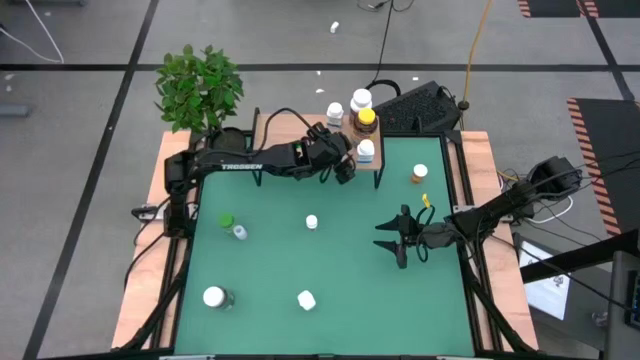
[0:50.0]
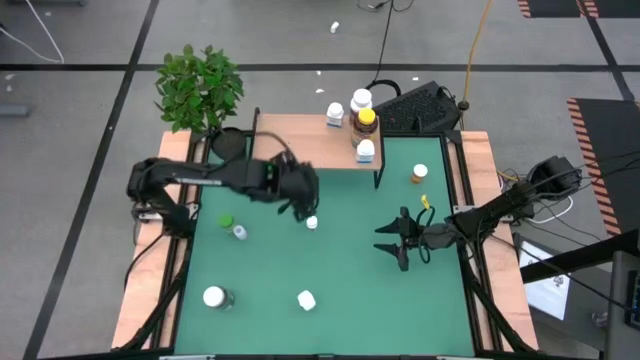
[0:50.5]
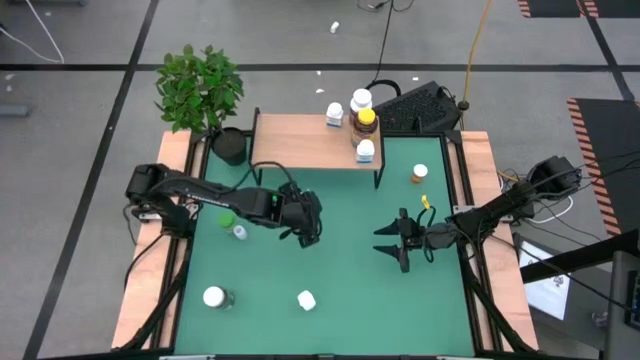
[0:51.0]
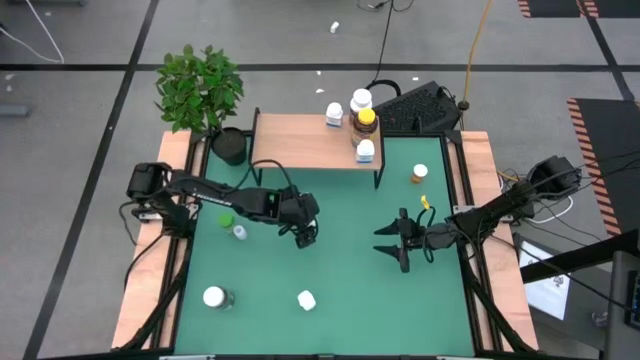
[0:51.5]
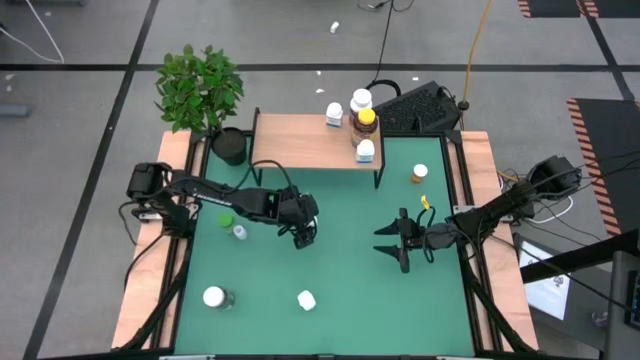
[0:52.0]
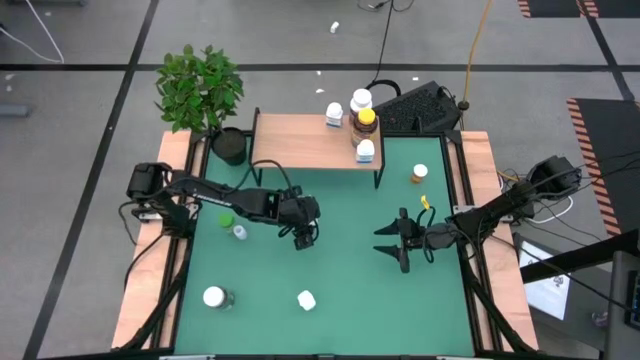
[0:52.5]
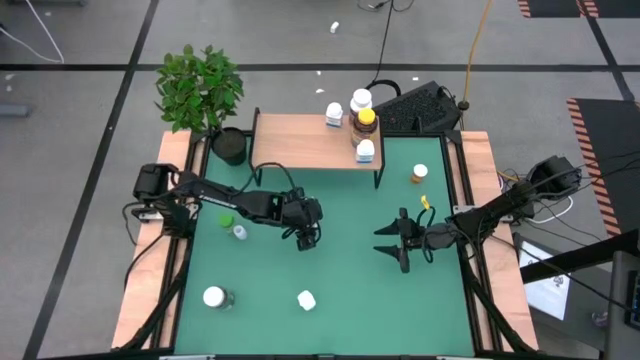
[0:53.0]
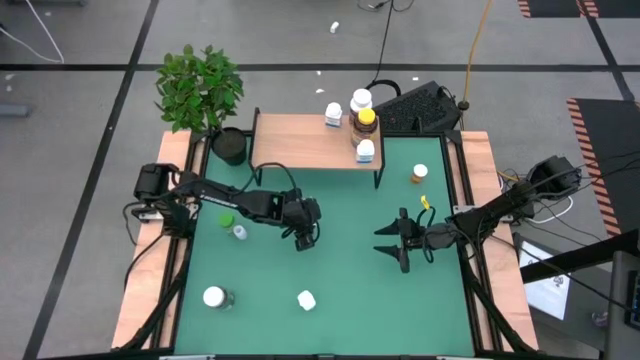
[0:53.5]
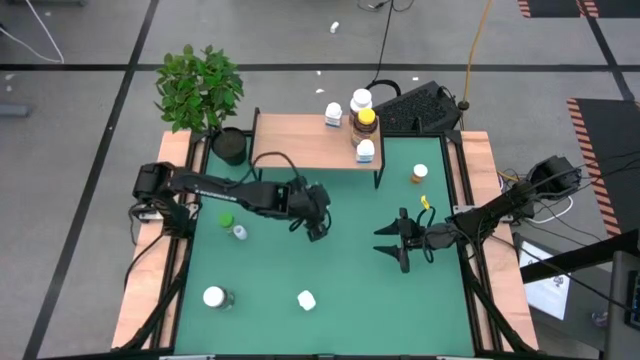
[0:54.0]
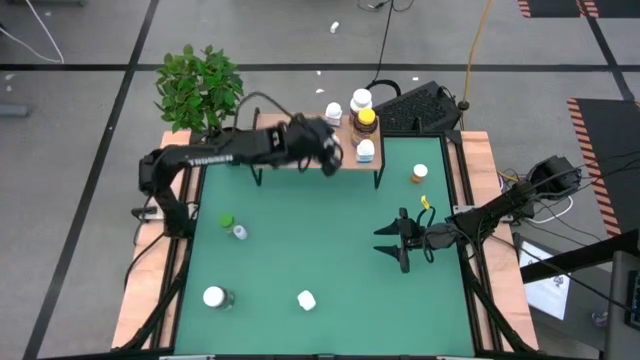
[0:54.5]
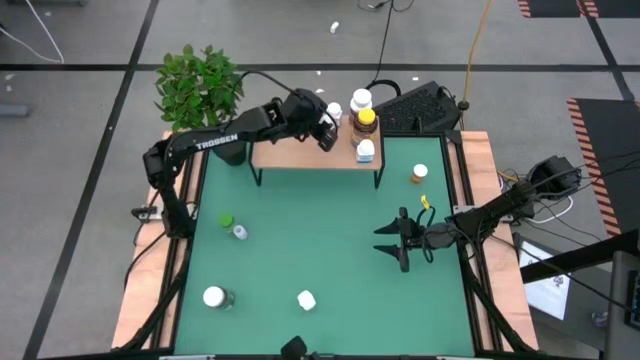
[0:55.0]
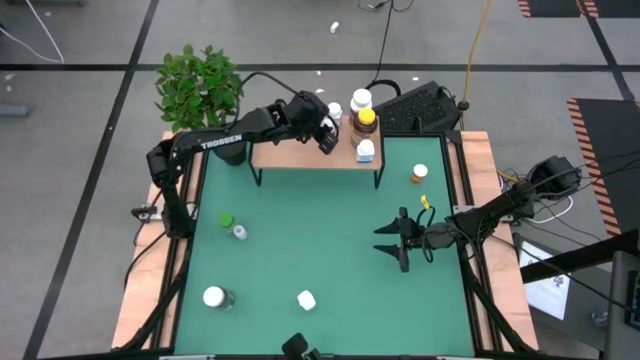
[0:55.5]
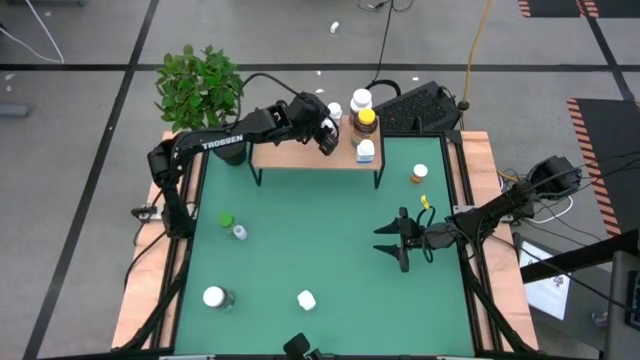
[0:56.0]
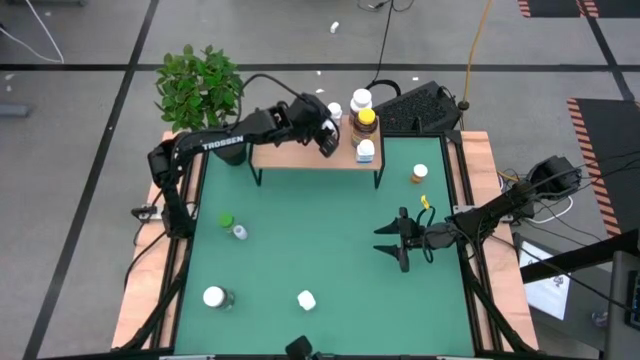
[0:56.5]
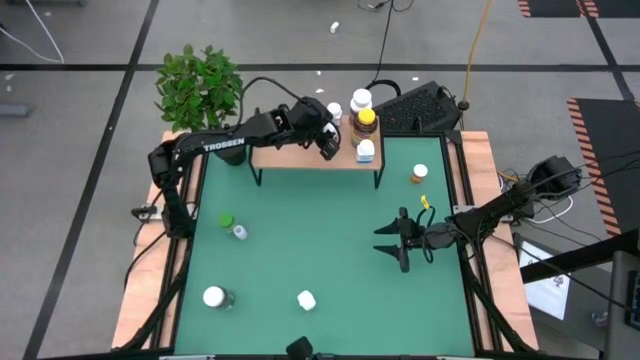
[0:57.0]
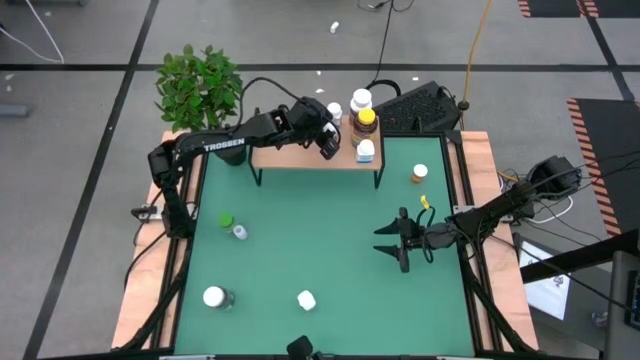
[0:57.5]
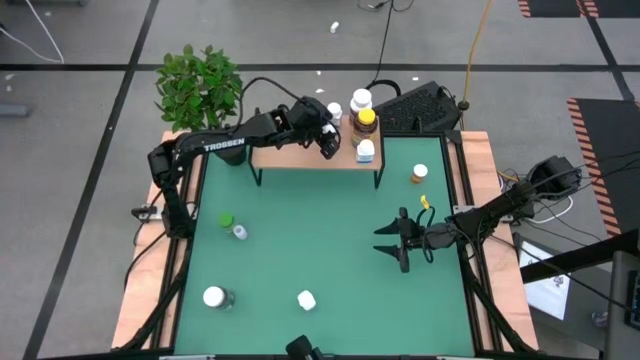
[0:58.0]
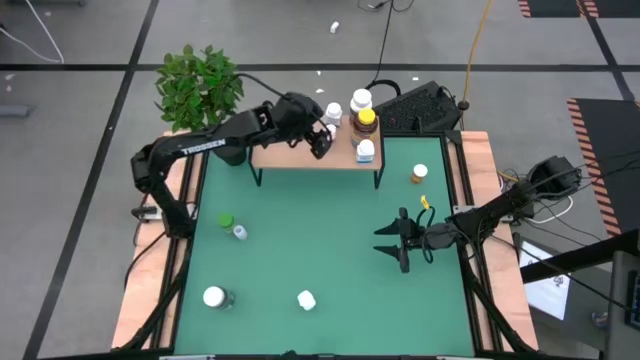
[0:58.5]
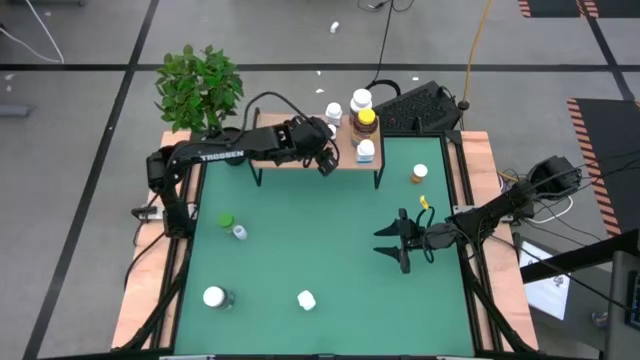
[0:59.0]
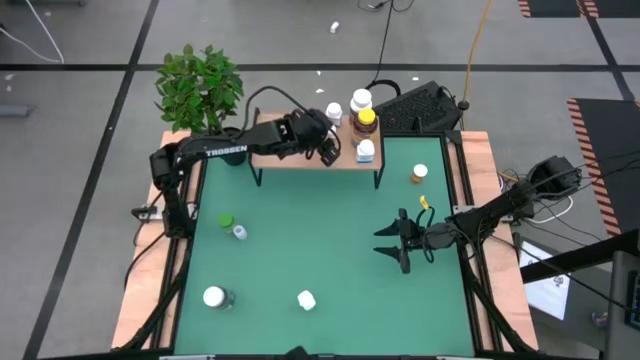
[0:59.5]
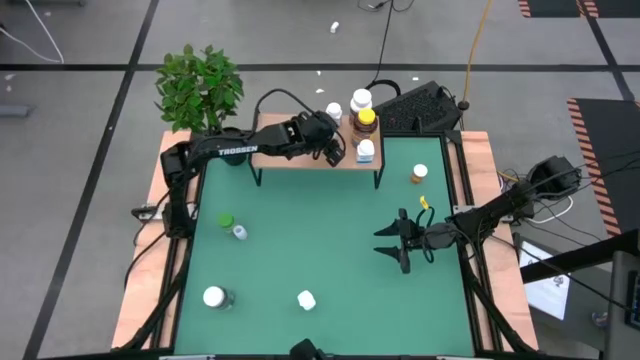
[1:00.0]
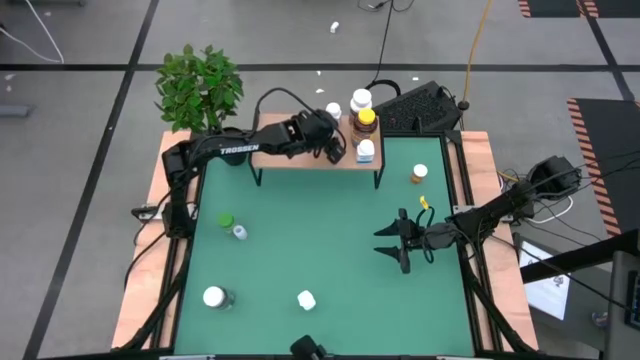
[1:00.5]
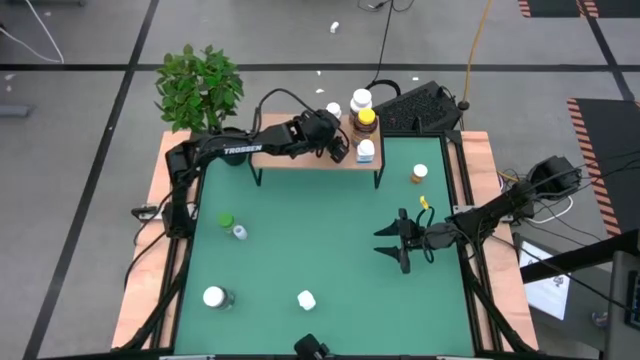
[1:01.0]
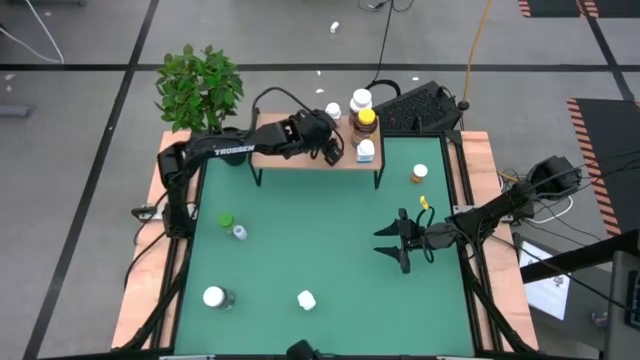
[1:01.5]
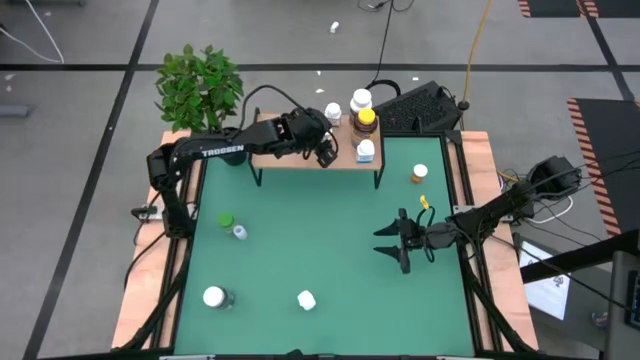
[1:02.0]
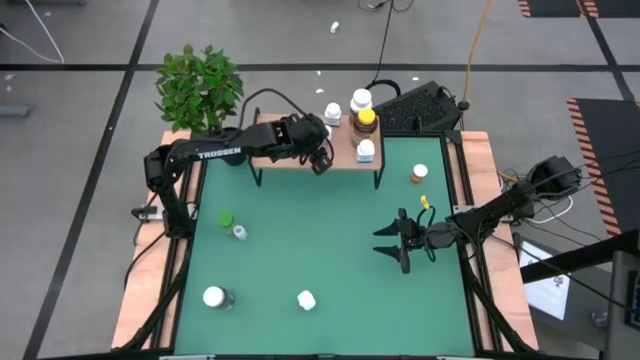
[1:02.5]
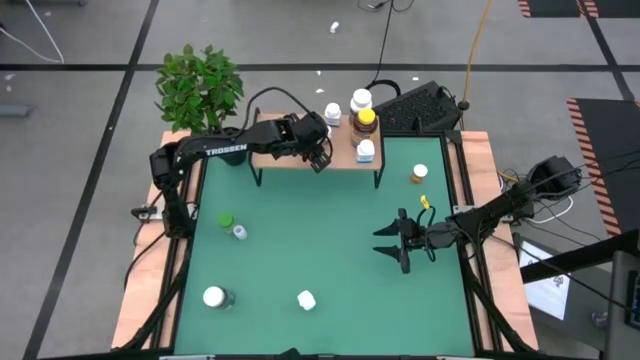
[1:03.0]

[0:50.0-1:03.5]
Task: Pick and place medicine bottles onto shelf by color
Put the small white pill bottle on the shelf

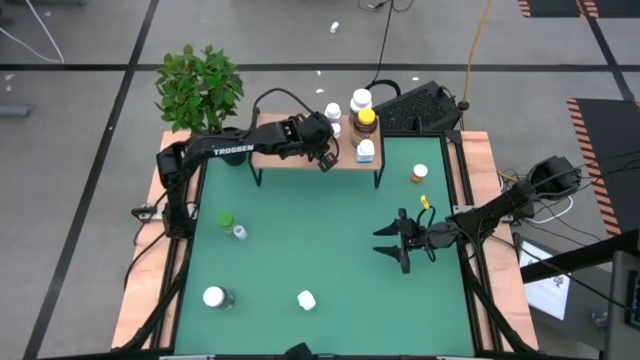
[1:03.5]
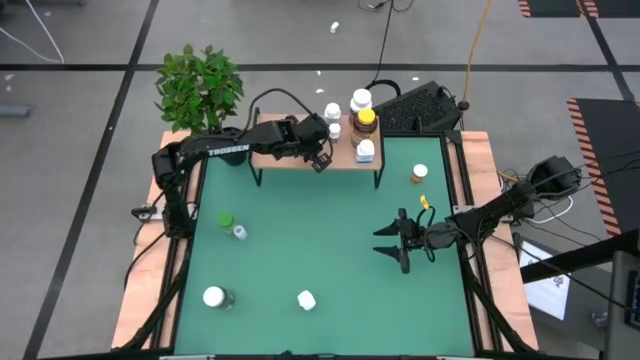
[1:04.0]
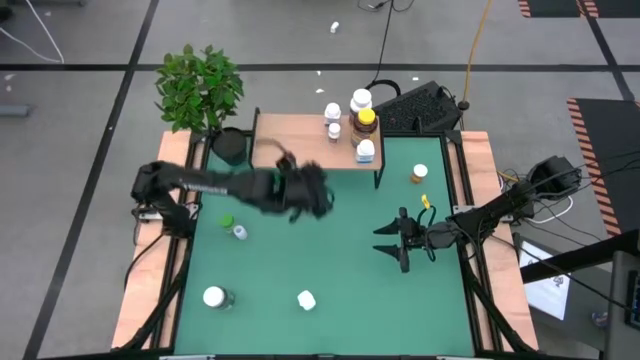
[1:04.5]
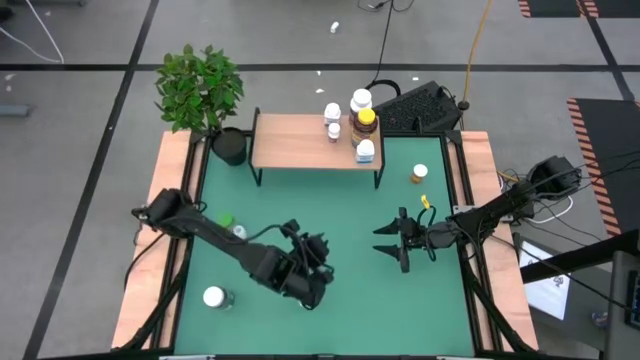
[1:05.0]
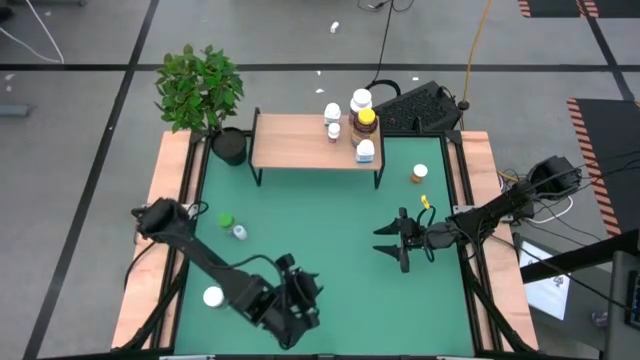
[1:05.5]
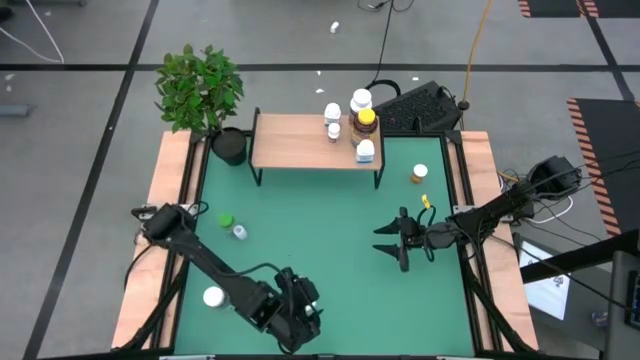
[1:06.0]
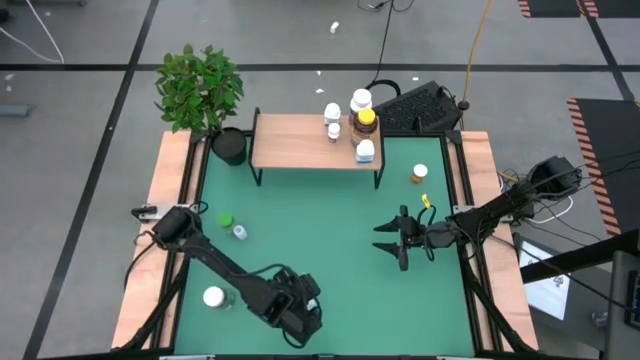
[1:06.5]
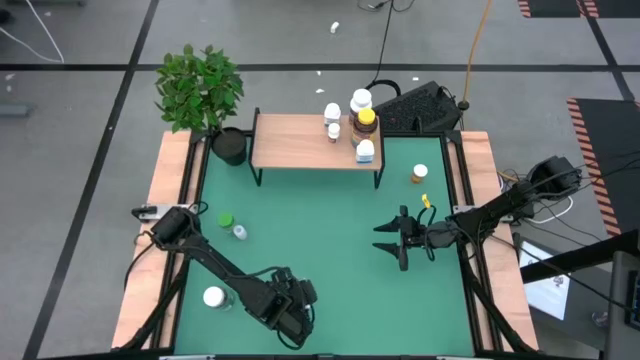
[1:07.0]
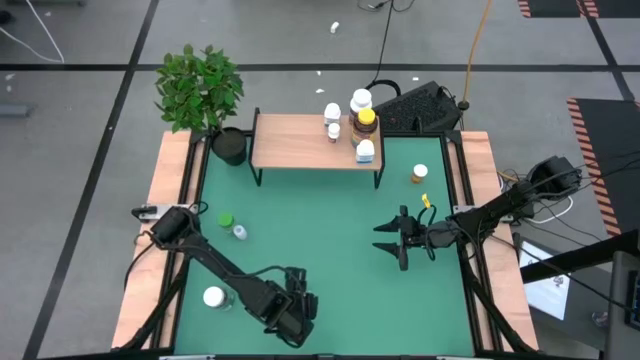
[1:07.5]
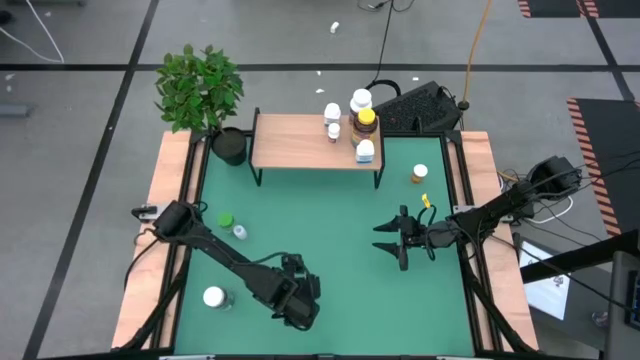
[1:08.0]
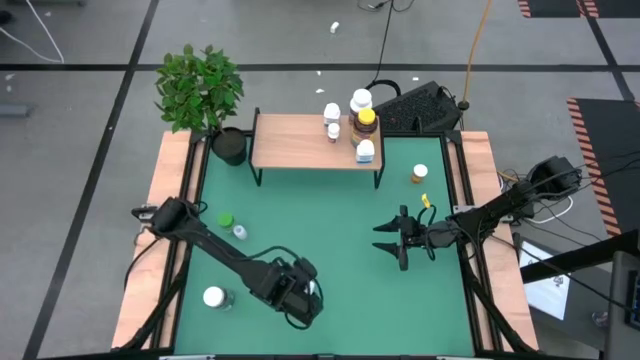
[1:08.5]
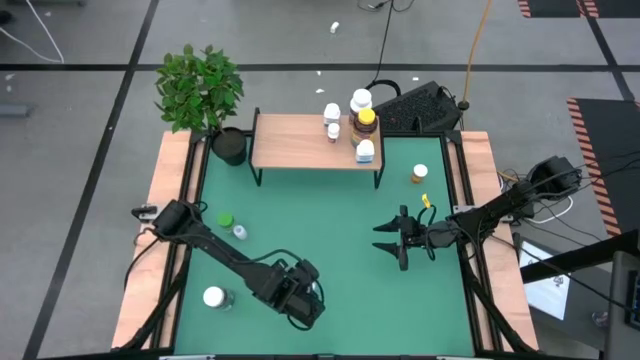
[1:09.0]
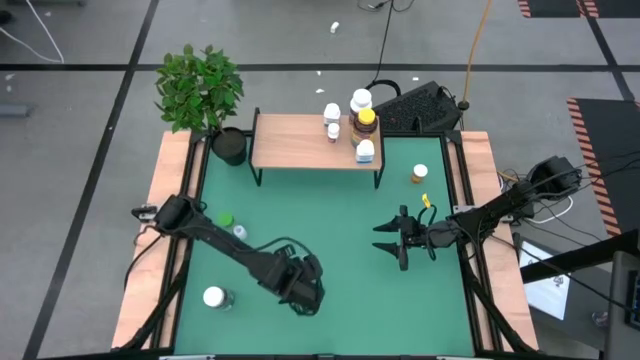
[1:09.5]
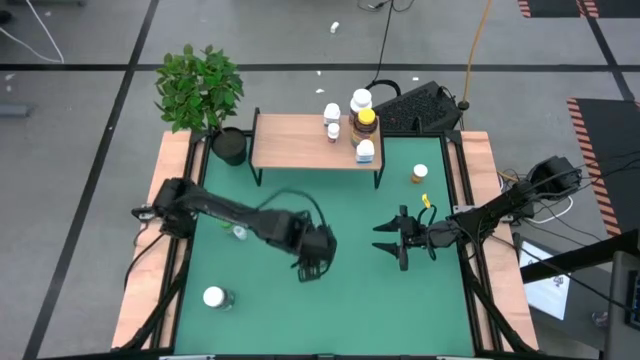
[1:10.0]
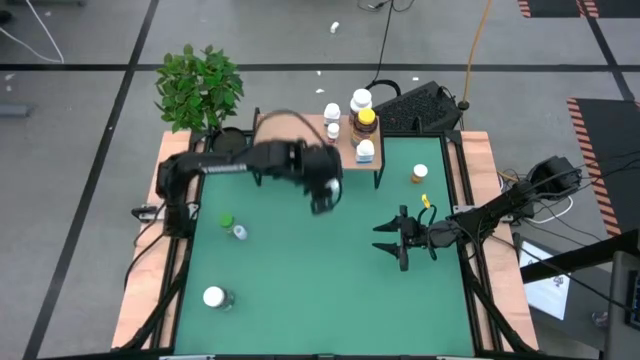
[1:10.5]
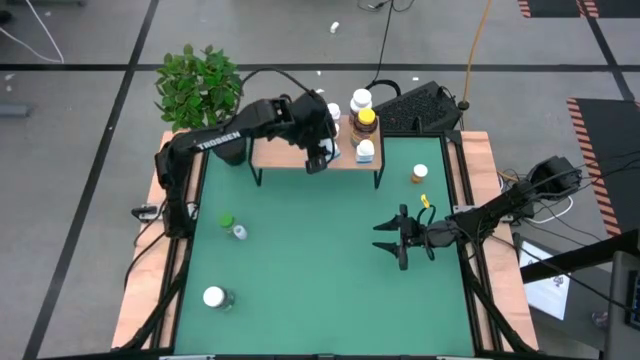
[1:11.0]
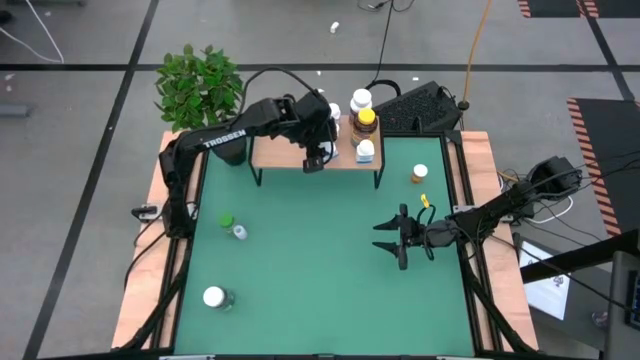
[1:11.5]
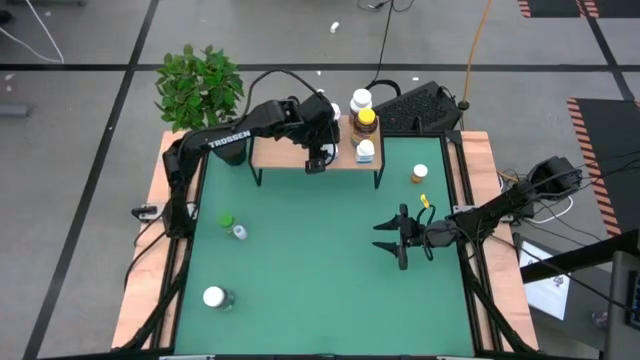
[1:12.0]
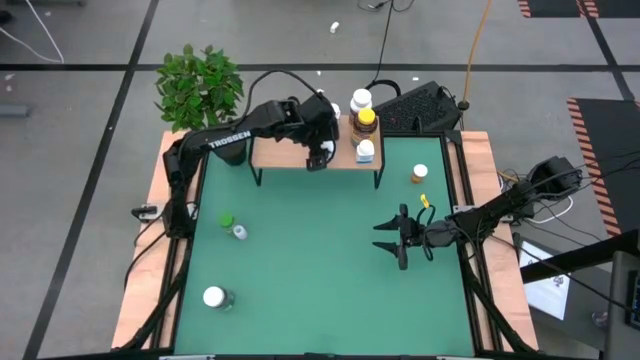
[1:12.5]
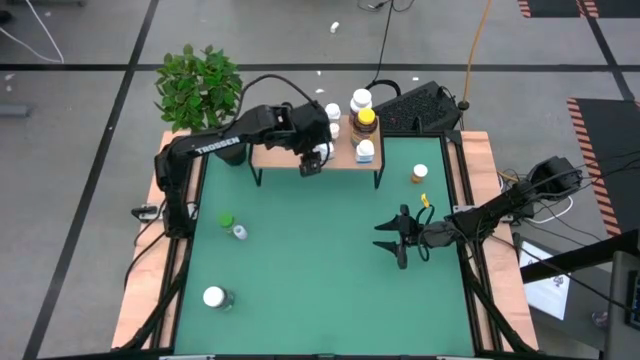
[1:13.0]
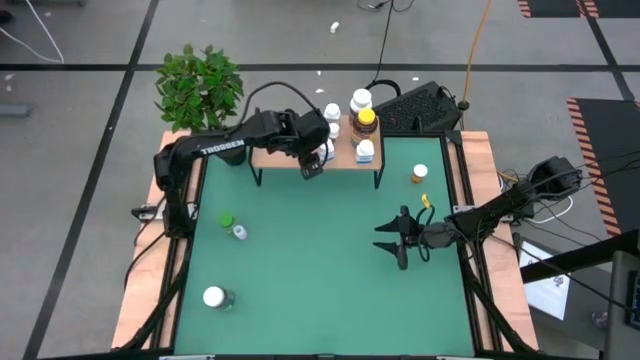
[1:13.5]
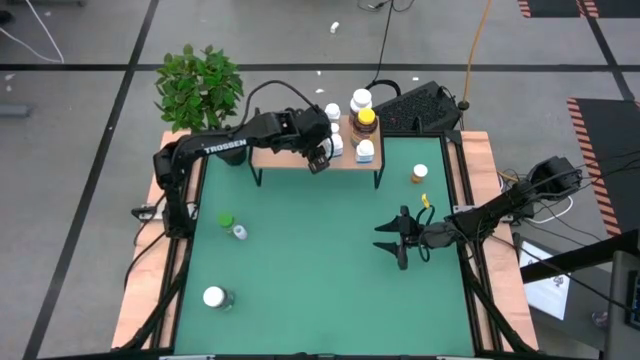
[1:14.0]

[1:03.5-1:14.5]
Put the large white pill bottle on the shelf
